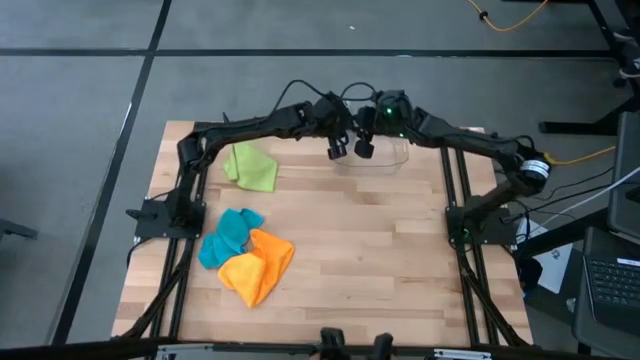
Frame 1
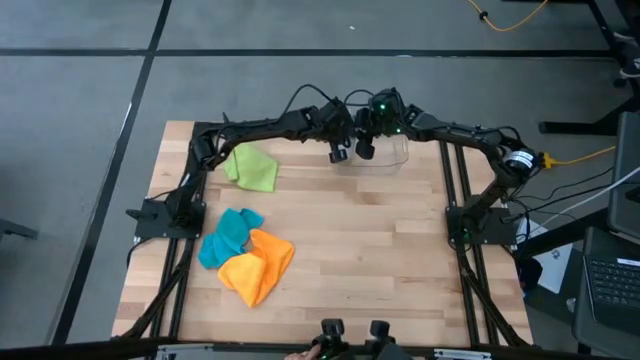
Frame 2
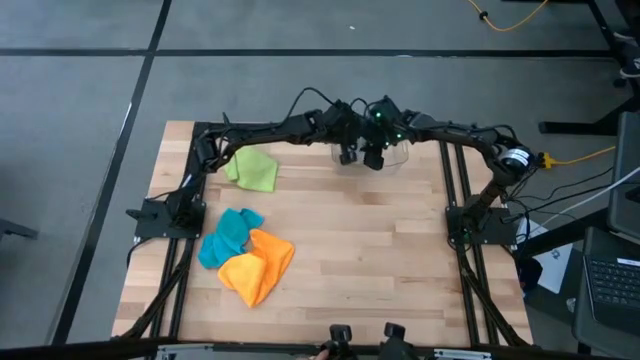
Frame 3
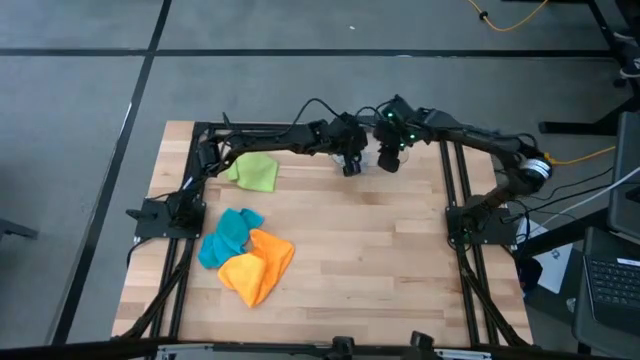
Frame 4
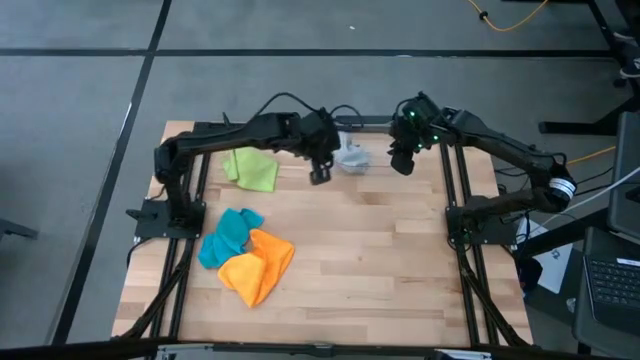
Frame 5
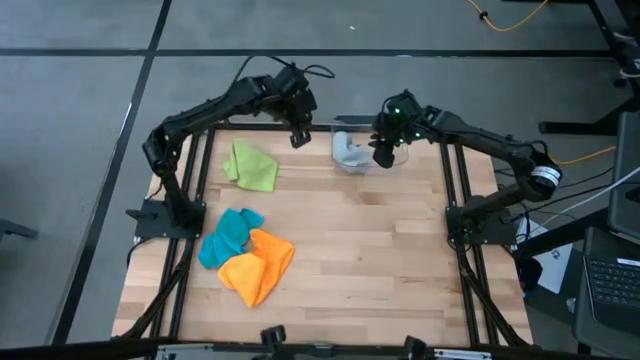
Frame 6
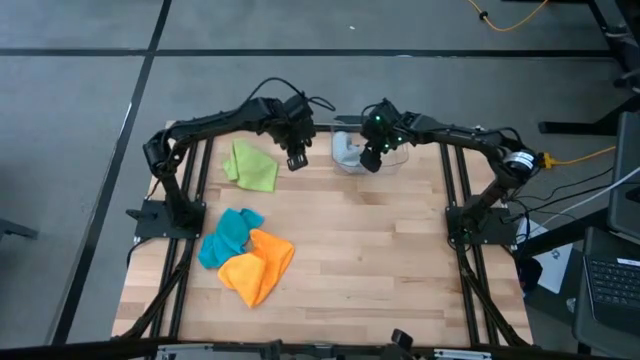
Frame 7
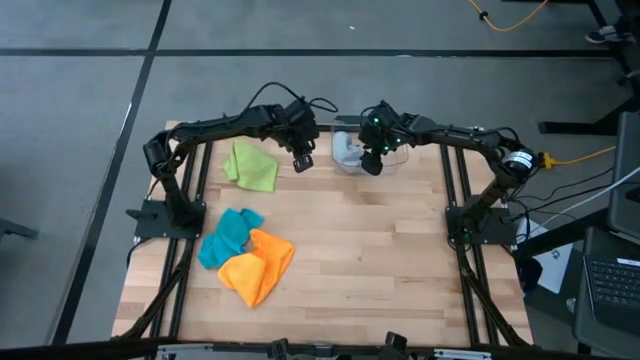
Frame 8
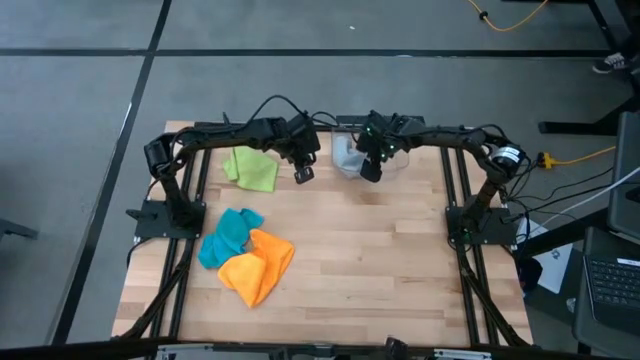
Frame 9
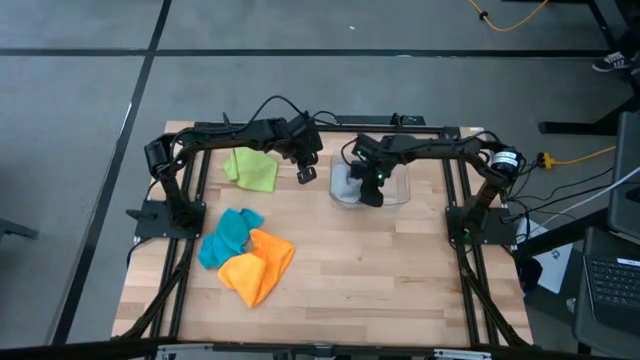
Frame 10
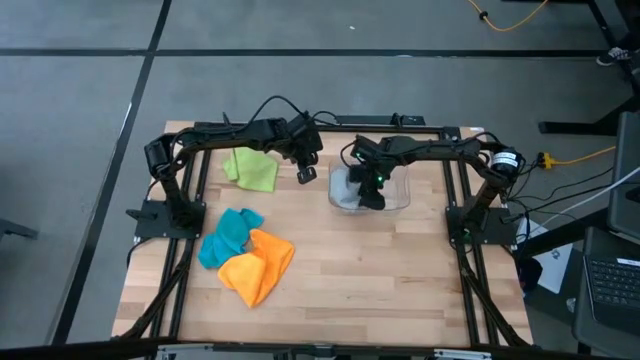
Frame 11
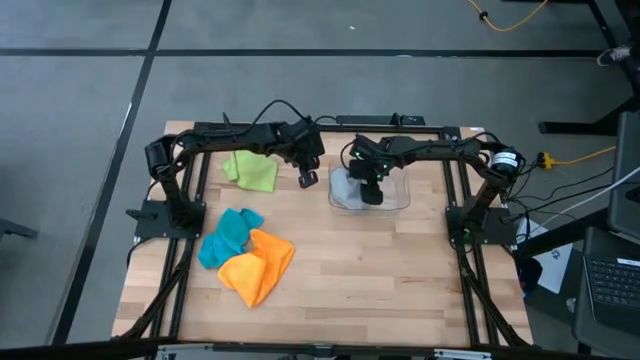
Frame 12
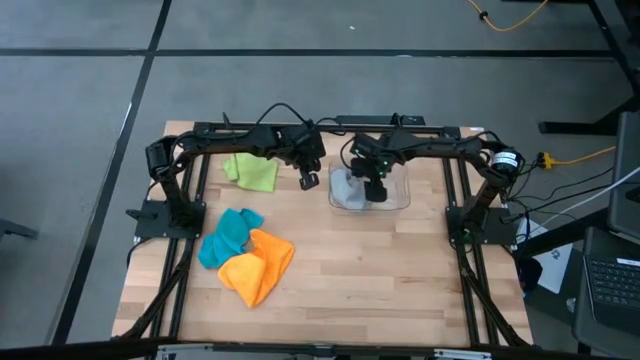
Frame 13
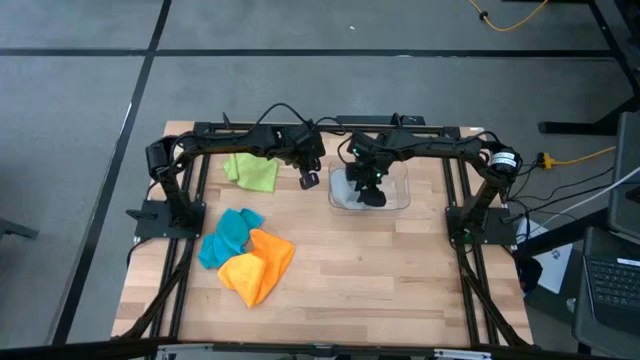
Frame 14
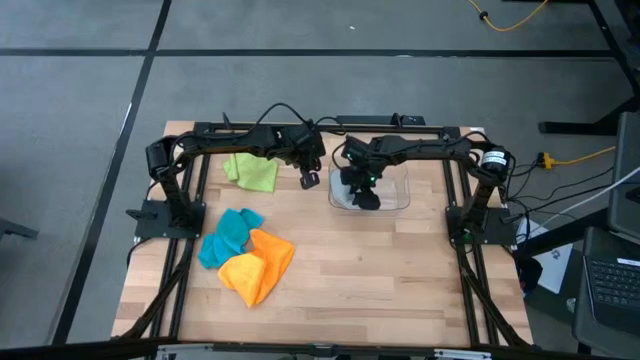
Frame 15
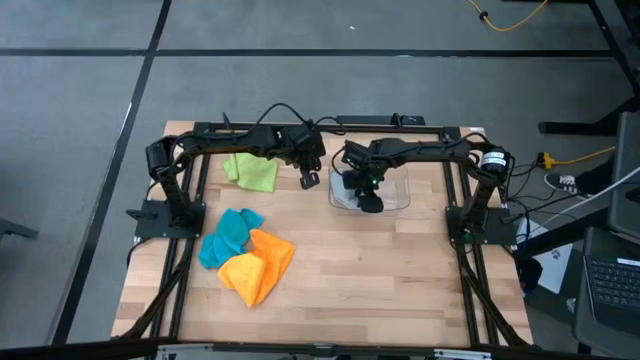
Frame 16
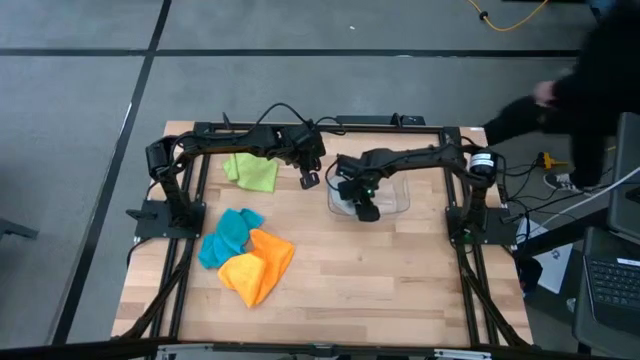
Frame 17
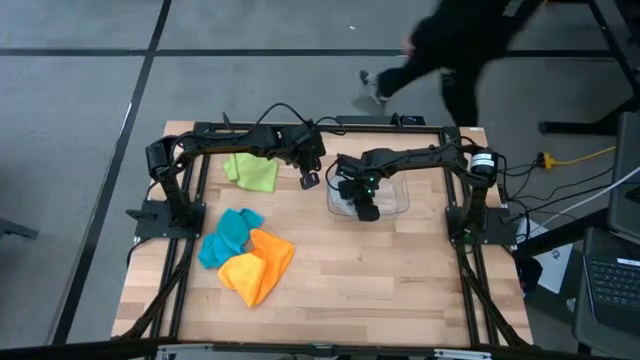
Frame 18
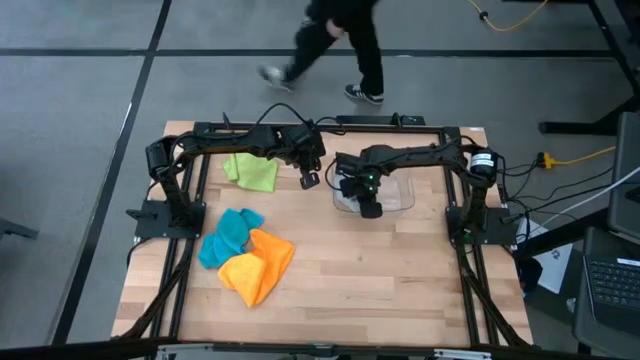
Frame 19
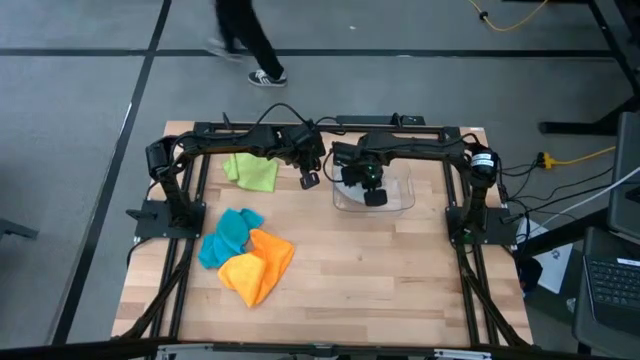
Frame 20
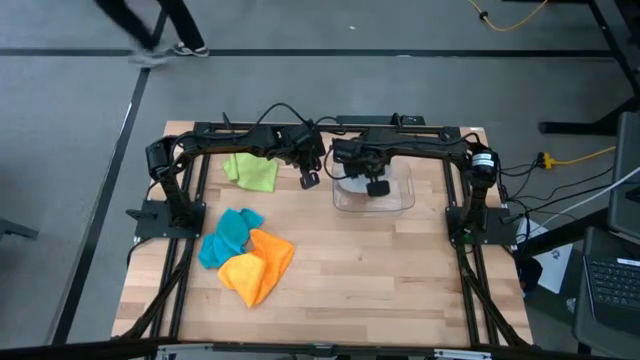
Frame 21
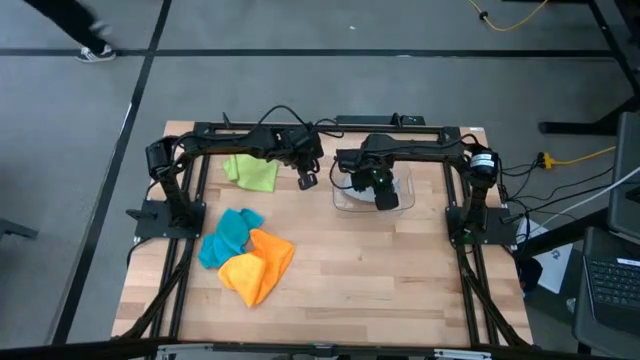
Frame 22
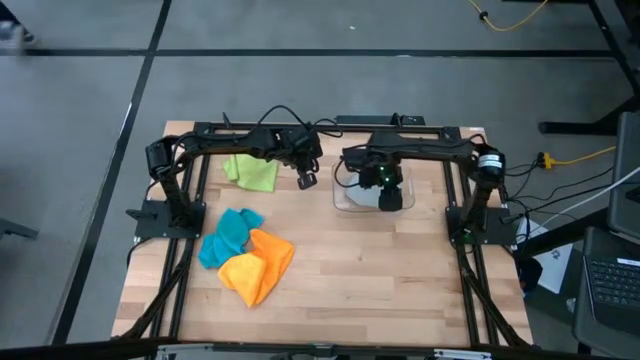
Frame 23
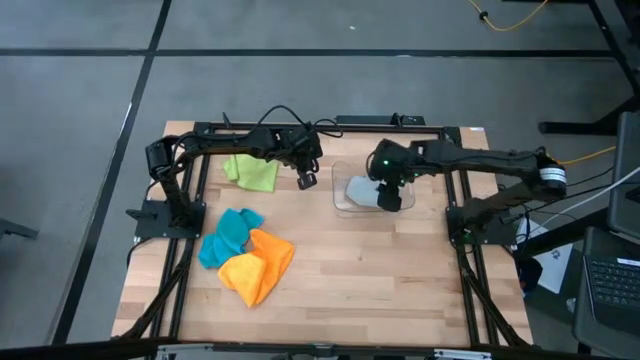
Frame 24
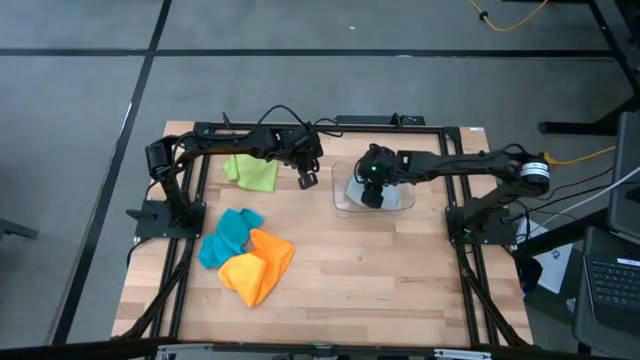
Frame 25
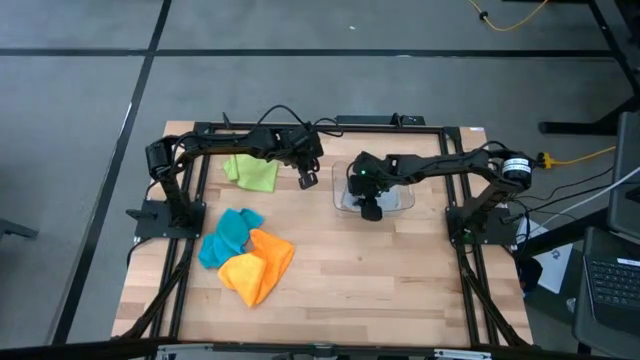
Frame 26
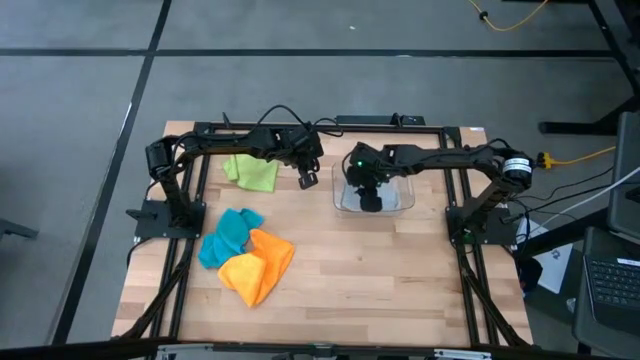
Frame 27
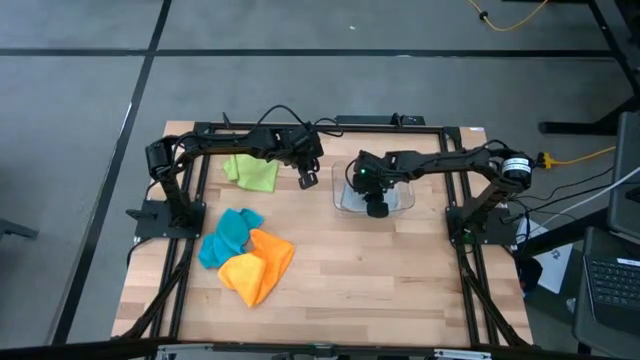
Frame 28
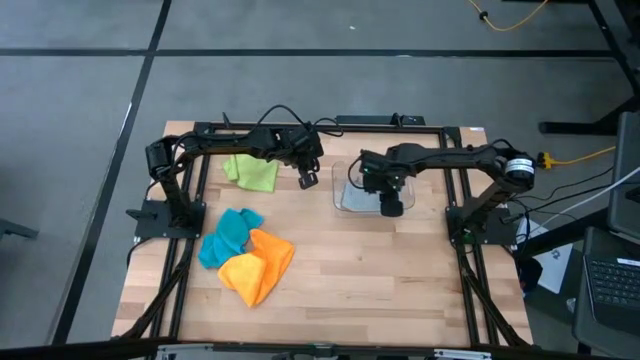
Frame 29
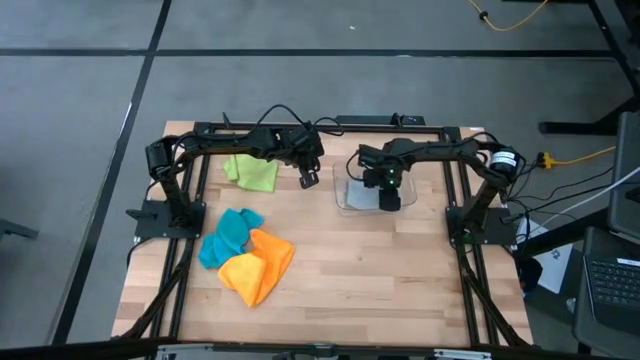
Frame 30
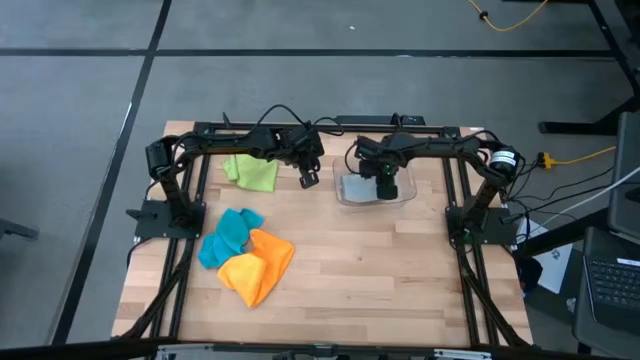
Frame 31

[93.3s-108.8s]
Task: Fold microfiber towels
Put the folded gray microfiber into the transparent bin

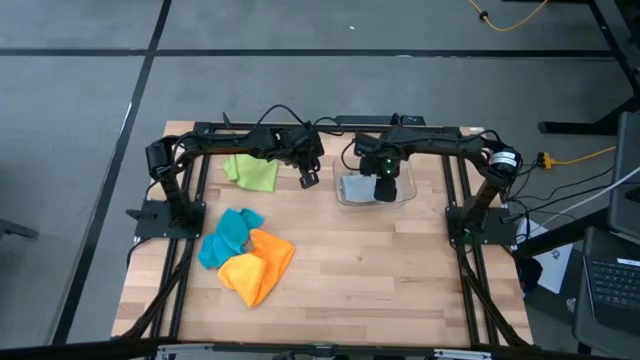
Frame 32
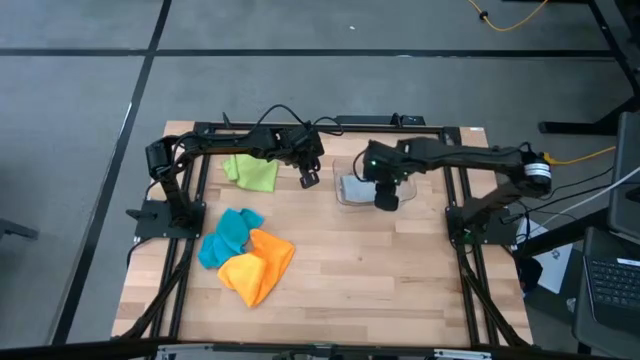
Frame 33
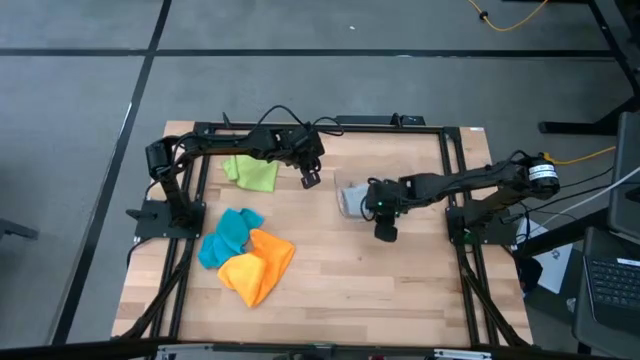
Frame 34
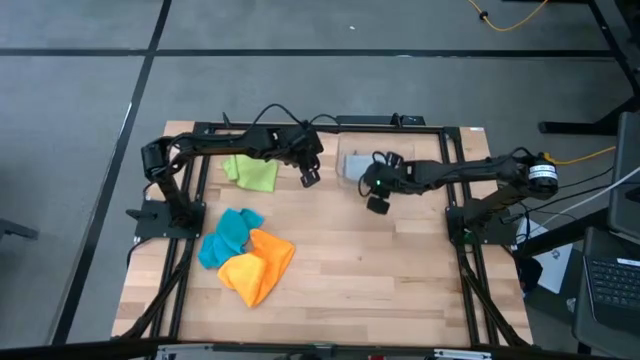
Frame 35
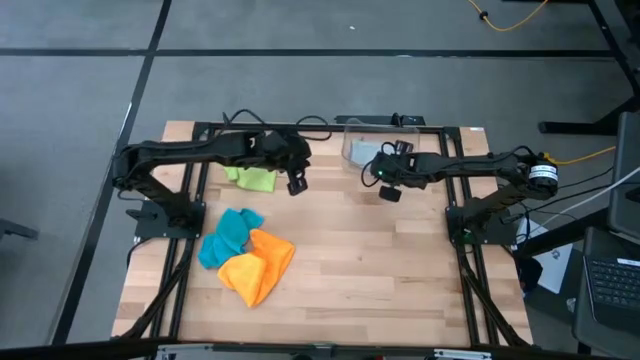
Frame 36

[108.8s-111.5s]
Move the transparent bin to the top right of the table

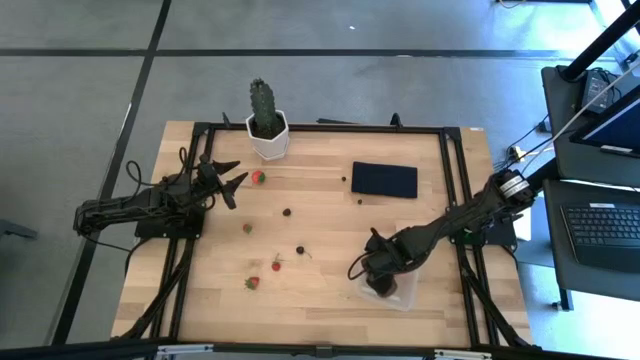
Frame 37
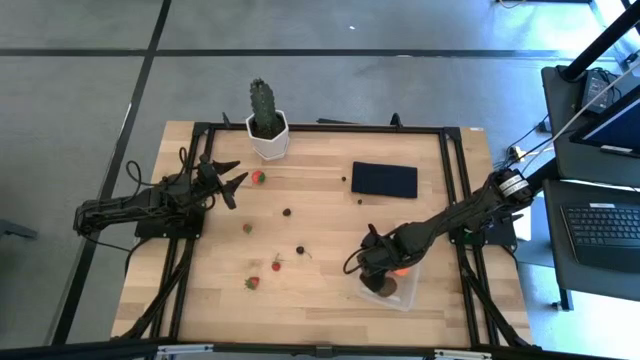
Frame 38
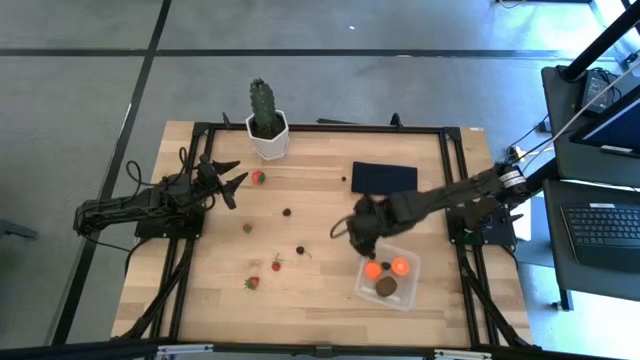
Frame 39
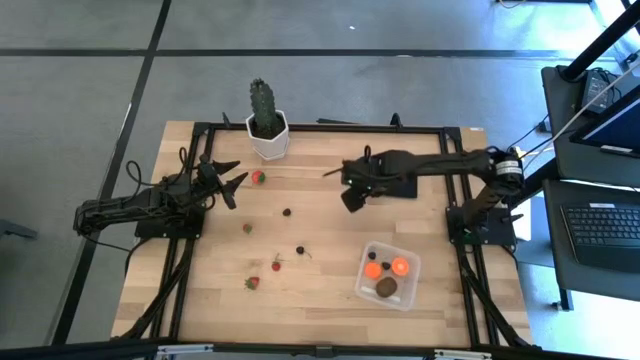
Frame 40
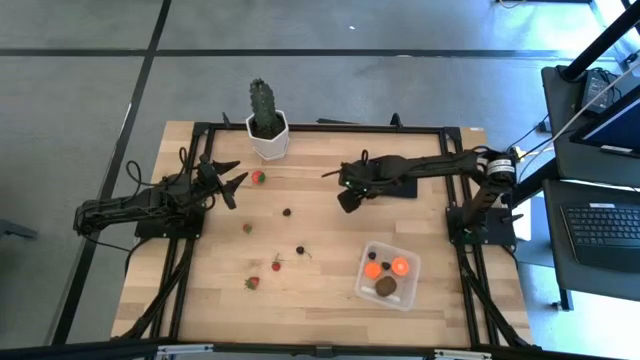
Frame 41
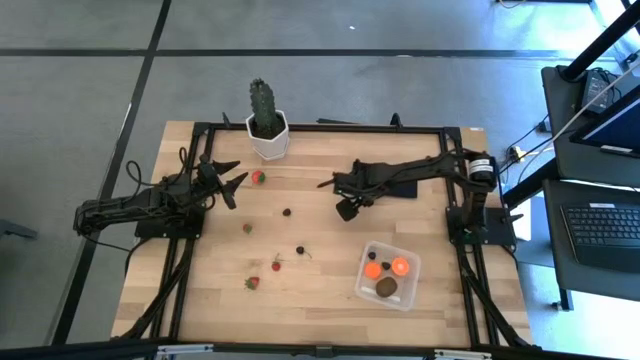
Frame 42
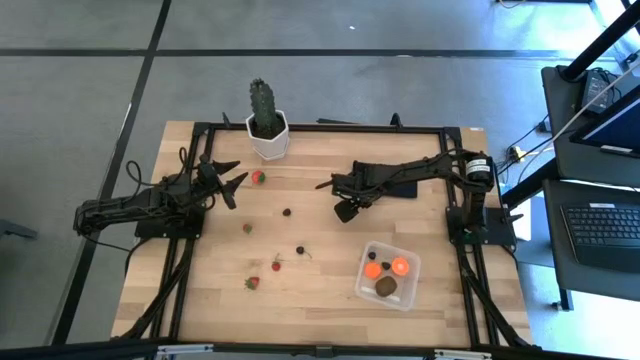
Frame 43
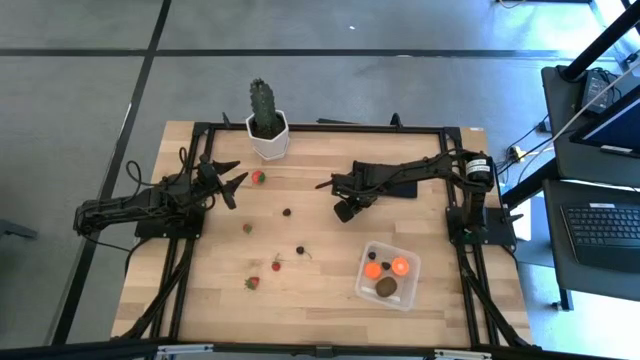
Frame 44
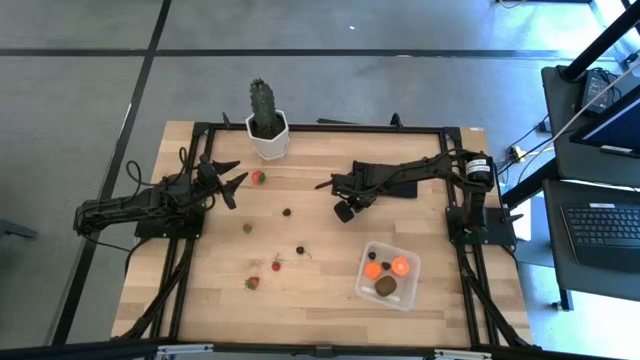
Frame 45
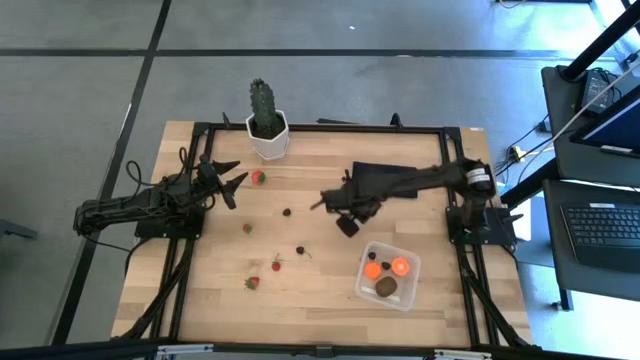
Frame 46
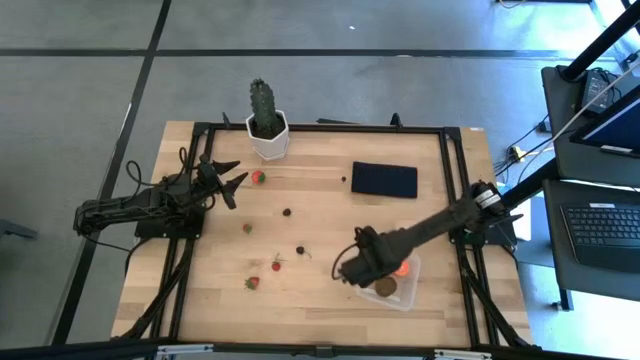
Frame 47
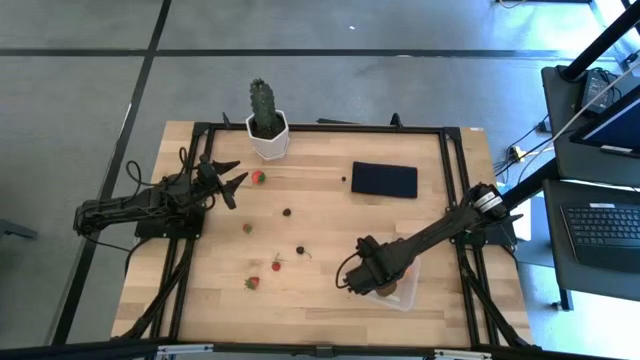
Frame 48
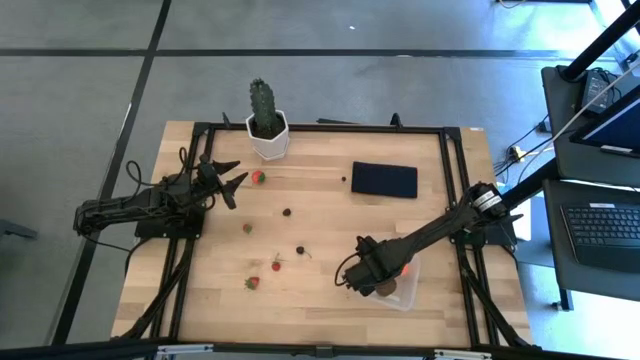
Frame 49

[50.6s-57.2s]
Task: Pick and placing Produce into tupperware
Put the bottom blueberry into the transparent bin
